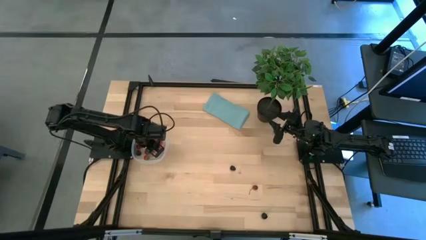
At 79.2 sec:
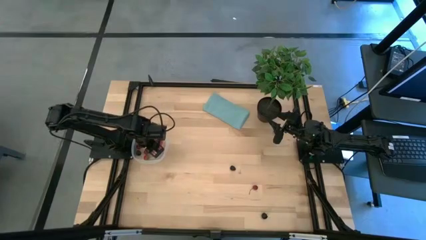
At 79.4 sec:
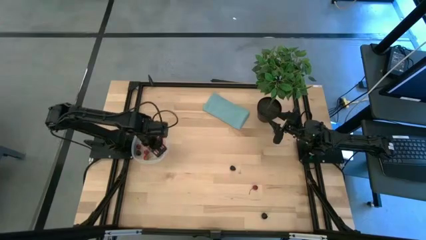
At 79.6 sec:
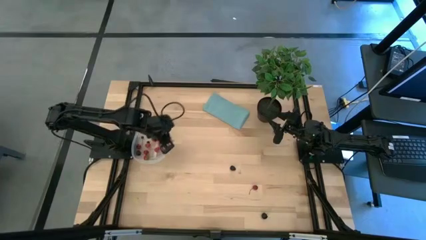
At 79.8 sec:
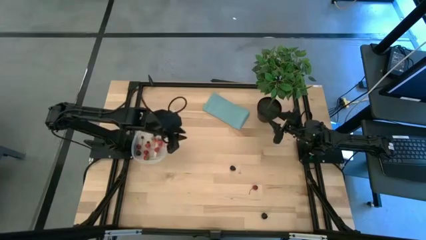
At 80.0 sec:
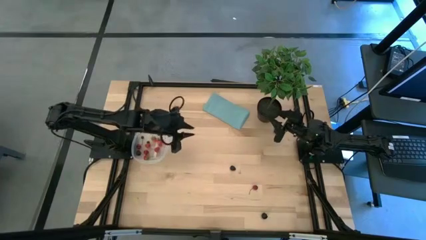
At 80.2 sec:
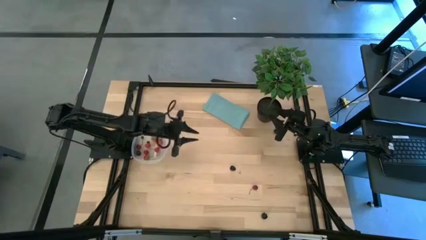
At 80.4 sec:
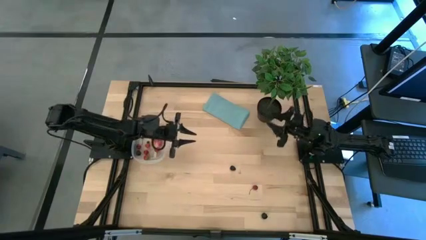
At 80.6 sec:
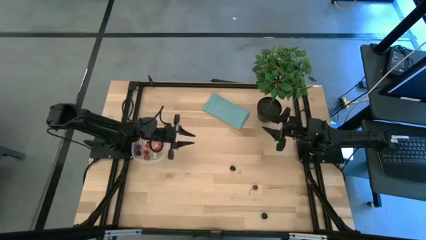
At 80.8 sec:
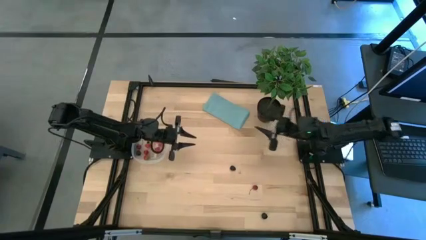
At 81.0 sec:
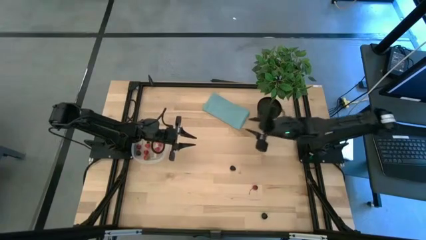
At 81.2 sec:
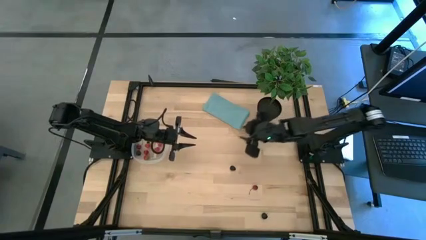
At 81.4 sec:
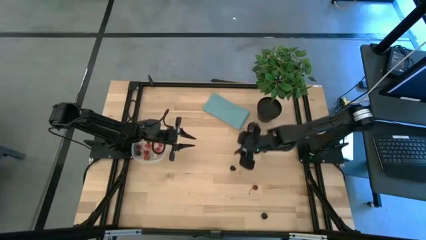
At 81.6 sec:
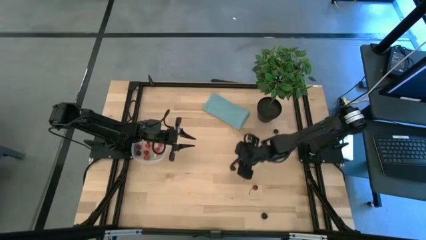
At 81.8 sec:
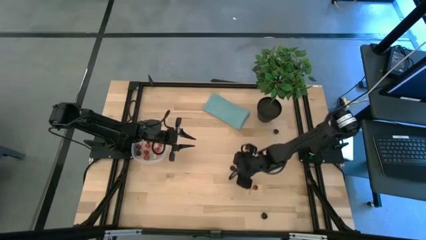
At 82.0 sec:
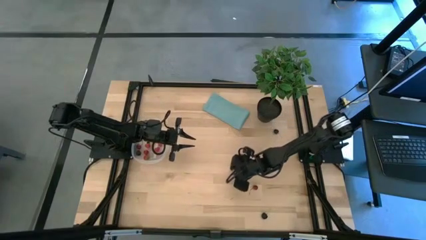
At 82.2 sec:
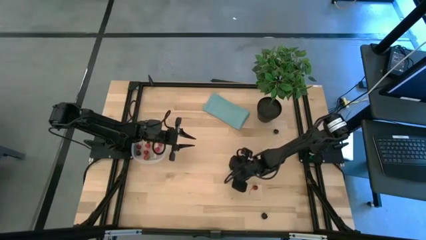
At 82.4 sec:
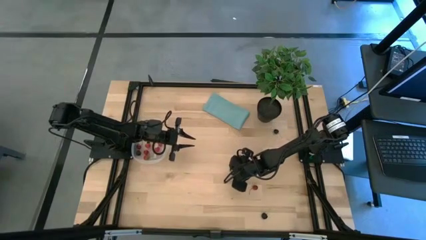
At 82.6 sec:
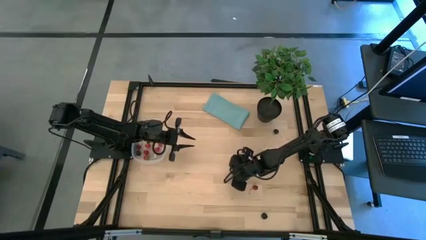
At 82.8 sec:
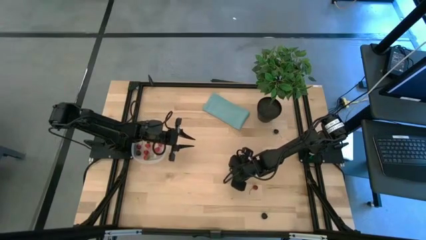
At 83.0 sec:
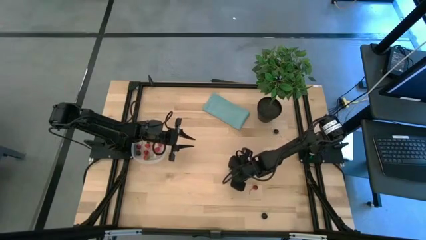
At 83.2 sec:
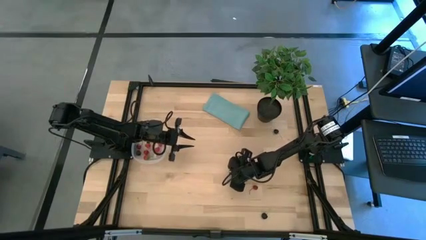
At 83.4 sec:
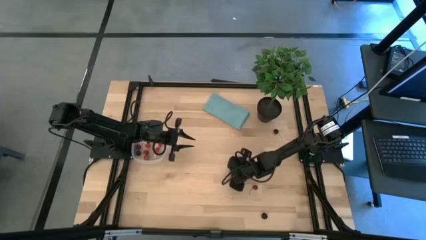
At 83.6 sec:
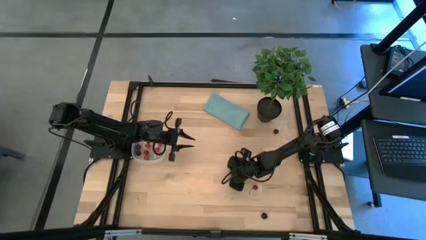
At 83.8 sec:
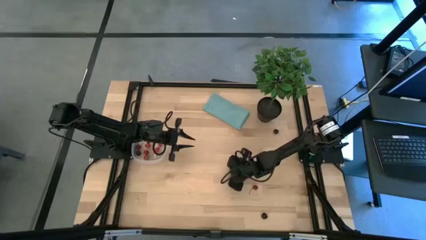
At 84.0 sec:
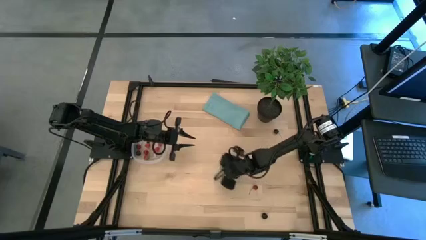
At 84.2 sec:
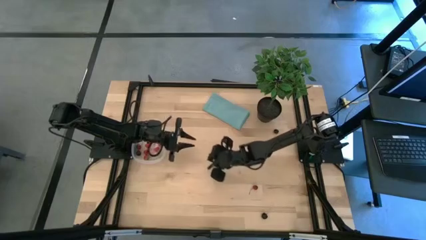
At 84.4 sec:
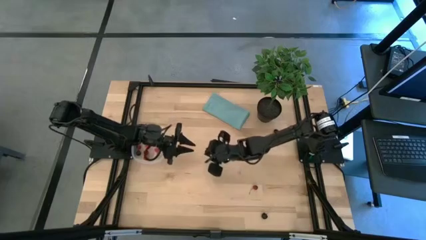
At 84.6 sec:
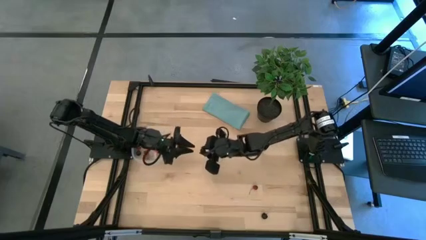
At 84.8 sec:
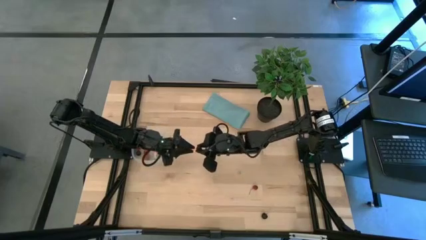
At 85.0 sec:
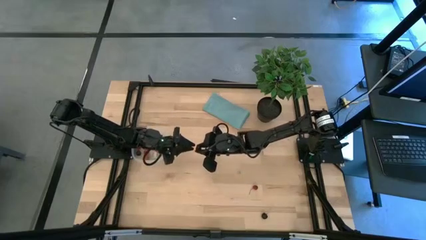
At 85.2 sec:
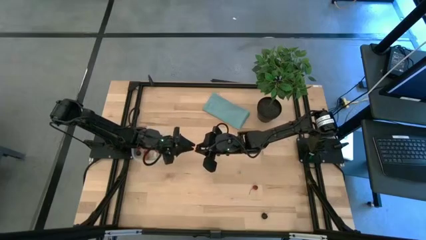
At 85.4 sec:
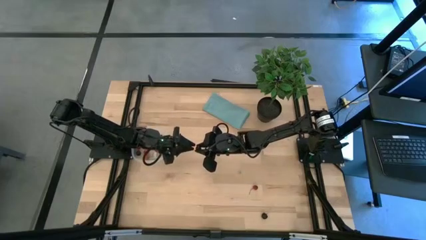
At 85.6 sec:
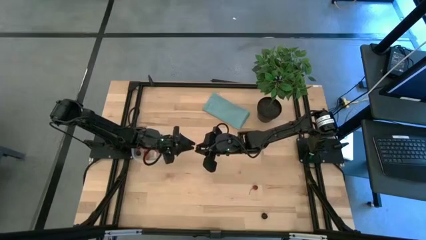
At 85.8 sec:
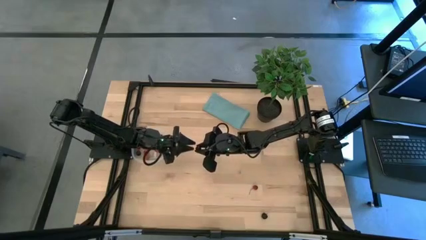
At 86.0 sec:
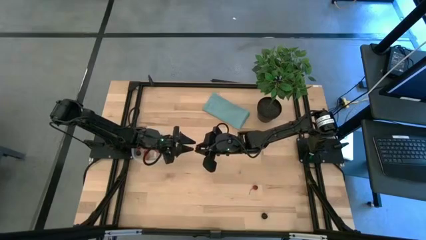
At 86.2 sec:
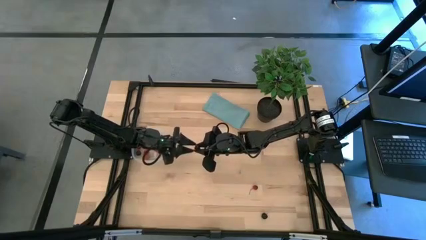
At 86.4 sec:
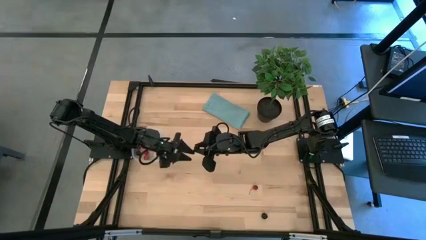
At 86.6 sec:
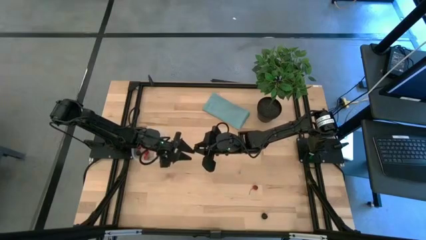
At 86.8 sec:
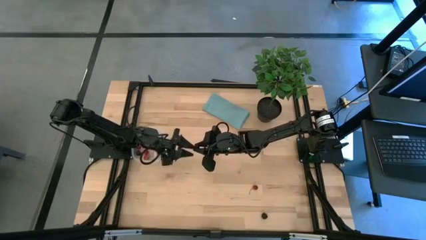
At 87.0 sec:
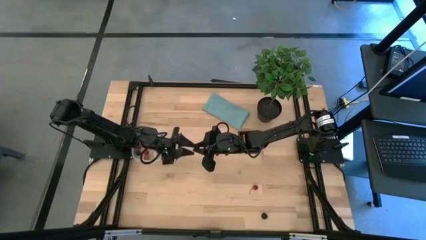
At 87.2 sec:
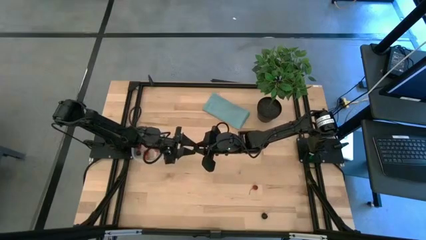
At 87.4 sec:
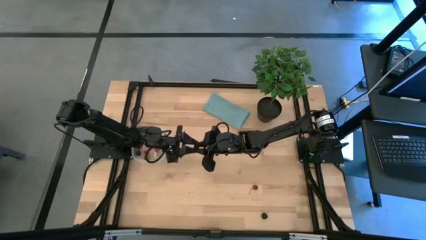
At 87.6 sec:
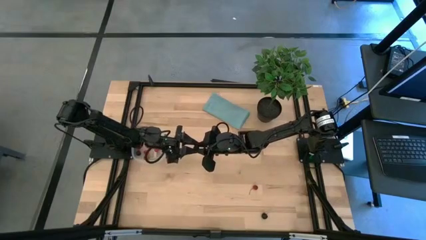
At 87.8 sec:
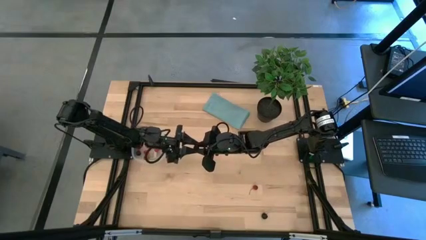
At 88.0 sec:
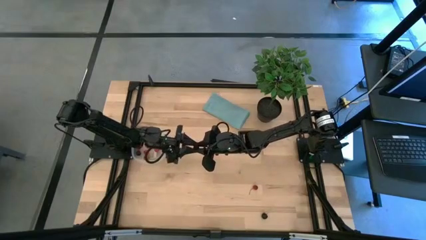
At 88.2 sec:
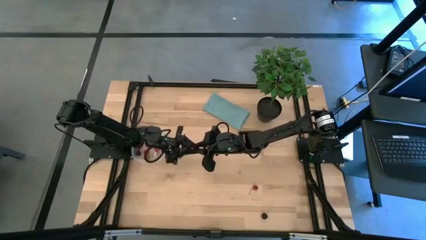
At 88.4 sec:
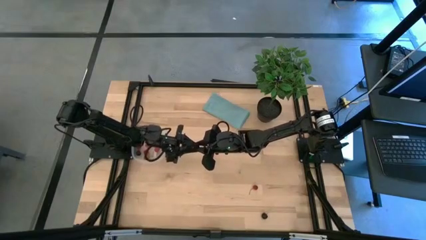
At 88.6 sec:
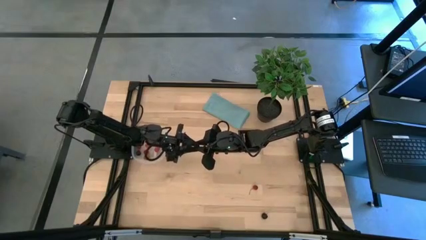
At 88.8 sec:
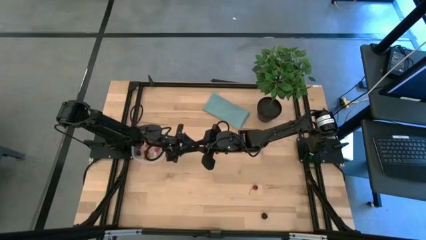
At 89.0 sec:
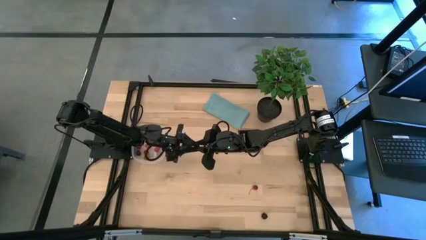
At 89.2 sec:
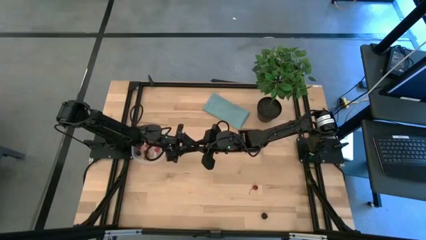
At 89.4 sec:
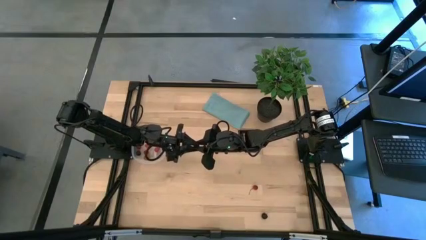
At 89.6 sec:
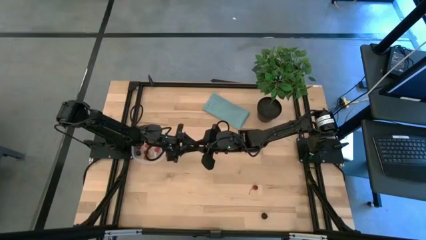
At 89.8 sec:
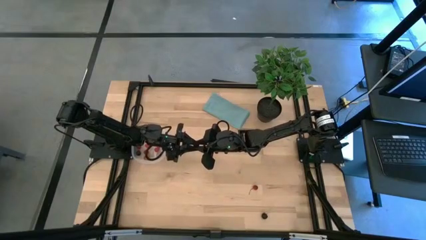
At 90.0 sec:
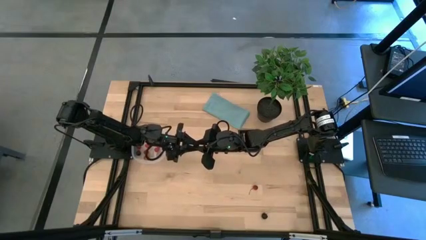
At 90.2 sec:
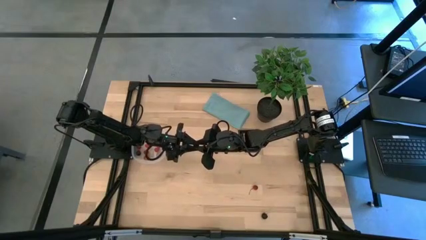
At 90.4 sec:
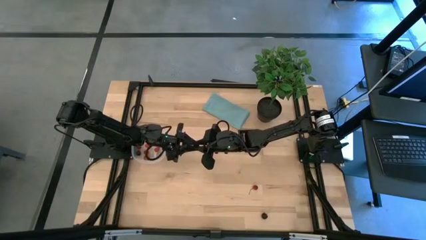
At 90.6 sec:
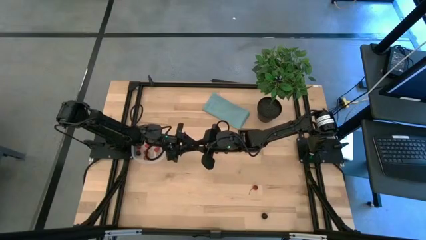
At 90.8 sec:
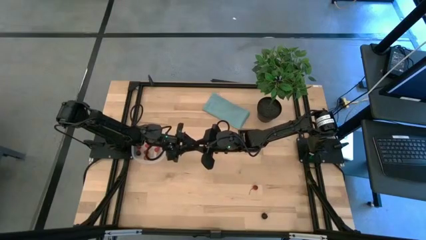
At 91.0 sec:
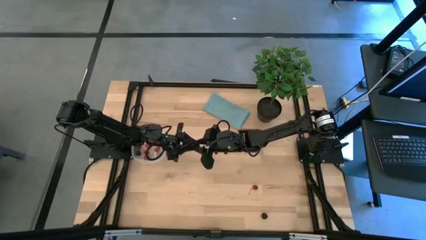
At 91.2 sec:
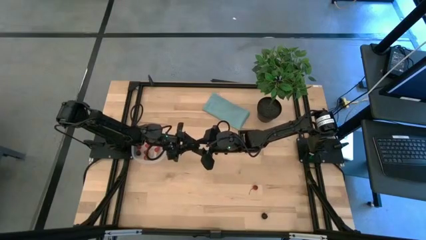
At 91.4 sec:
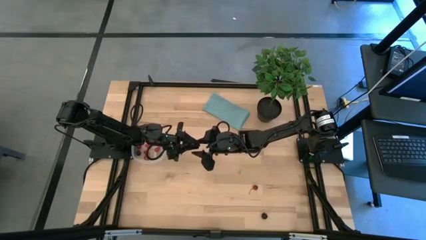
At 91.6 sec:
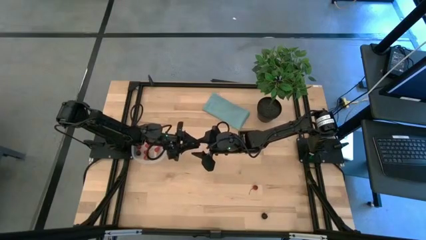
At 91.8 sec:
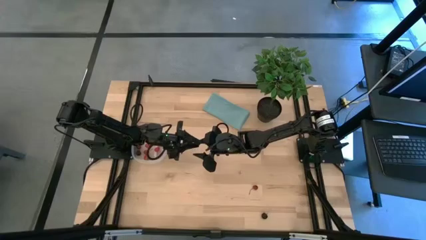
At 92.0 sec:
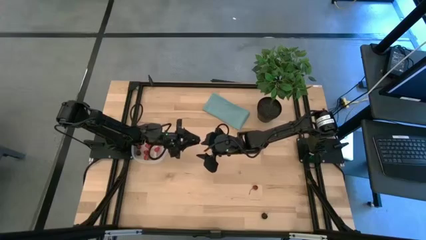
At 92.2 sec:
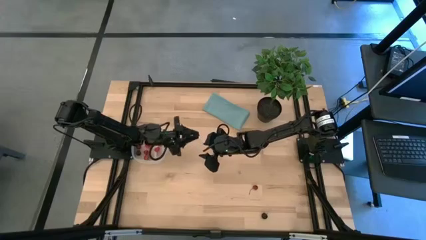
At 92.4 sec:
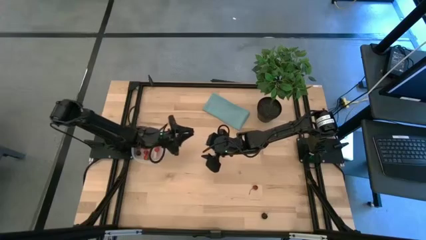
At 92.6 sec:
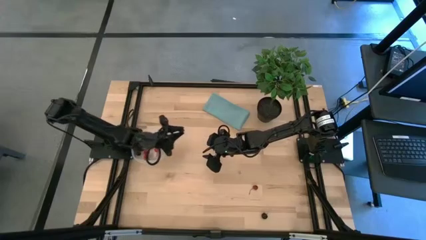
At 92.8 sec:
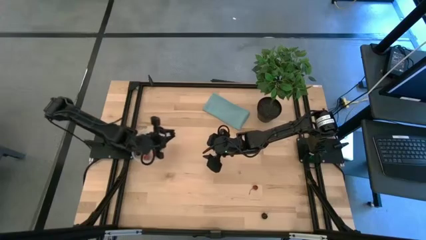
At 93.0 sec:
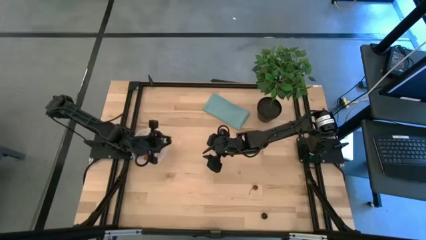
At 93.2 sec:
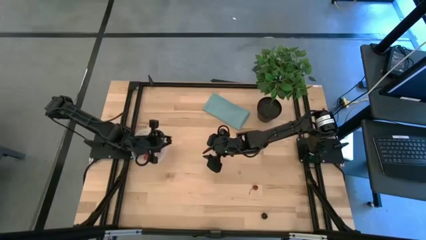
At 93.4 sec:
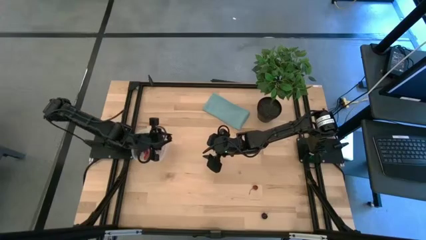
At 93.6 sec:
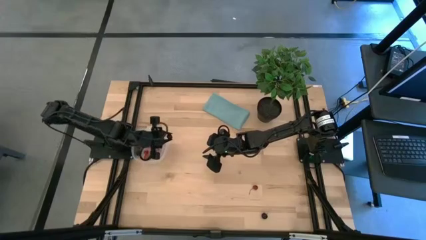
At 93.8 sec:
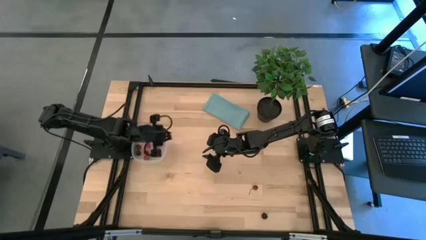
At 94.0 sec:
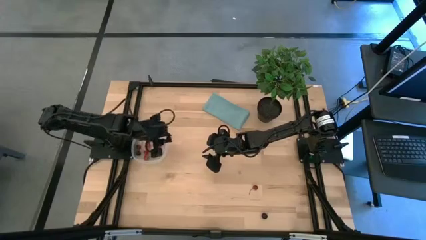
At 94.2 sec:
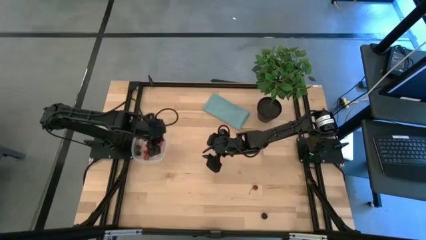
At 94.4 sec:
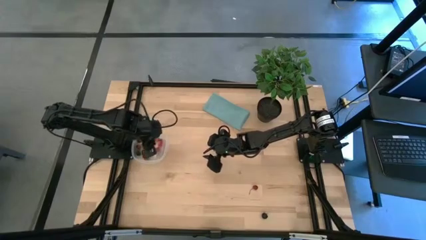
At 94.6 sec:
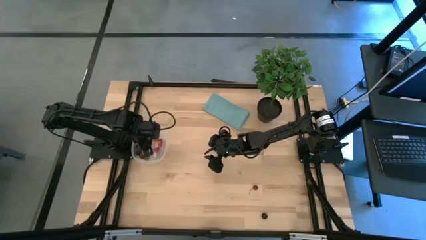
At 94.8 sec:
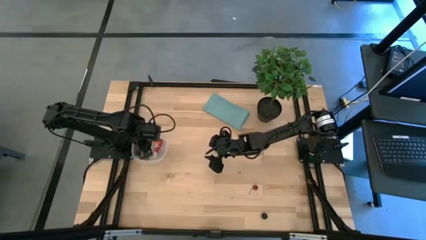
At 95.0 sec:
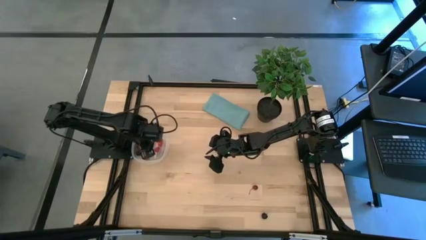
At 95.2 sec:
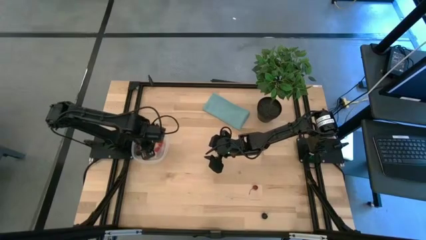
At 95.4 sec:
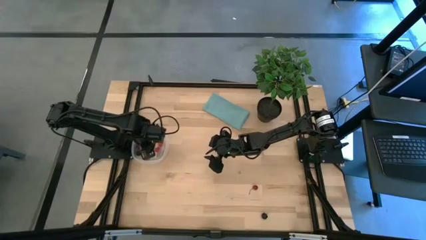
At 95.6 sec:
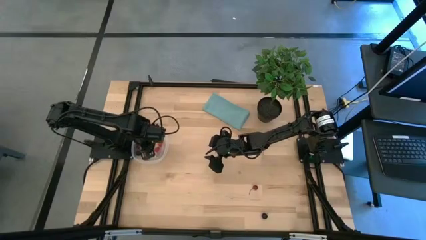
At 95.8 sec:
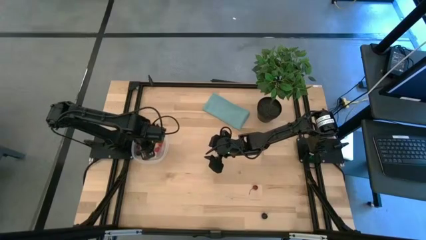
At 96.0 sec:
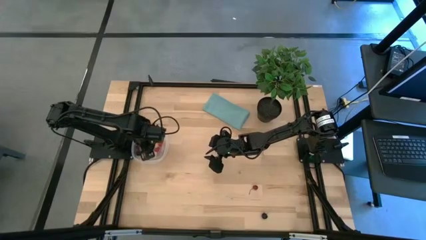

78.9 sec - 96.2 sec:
Task: Pick and placing Produce into tupperware
Put the blackberry into the transparent bin
